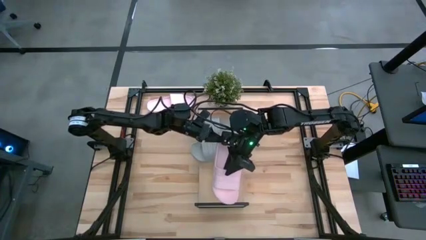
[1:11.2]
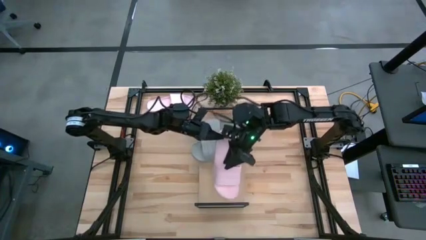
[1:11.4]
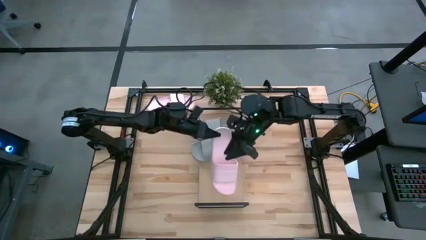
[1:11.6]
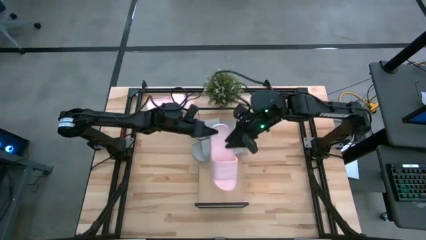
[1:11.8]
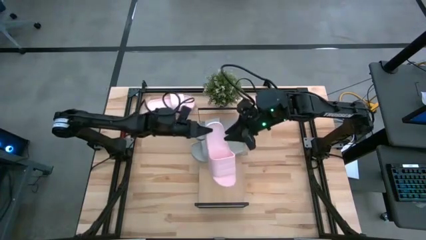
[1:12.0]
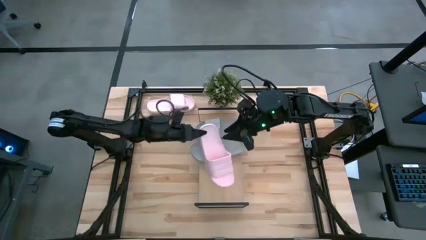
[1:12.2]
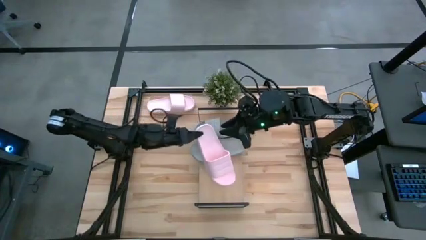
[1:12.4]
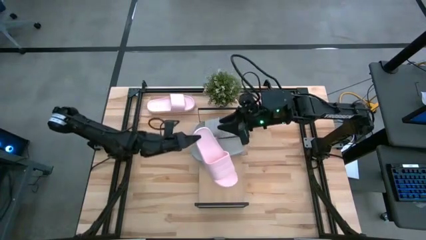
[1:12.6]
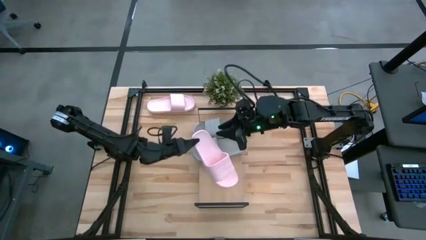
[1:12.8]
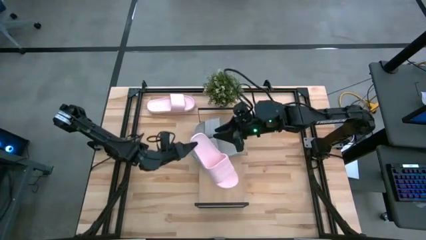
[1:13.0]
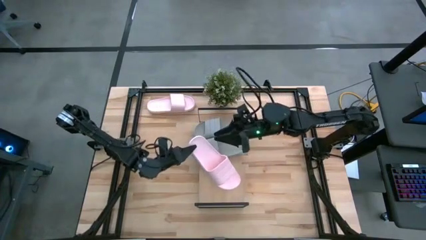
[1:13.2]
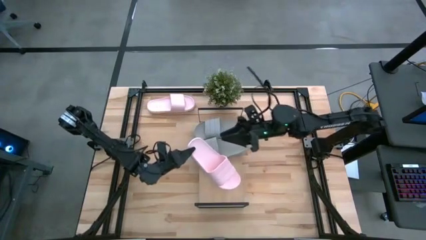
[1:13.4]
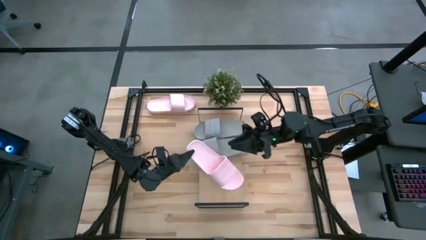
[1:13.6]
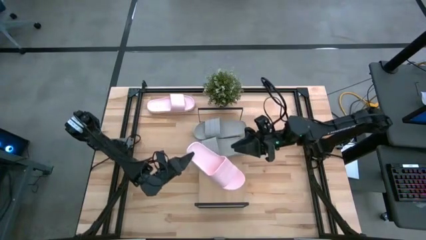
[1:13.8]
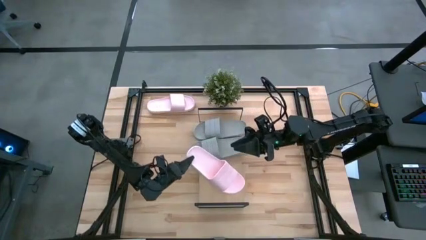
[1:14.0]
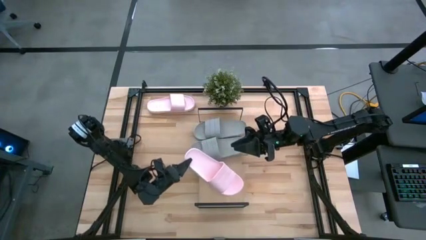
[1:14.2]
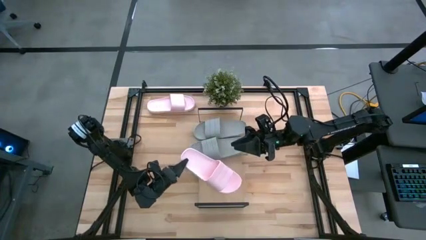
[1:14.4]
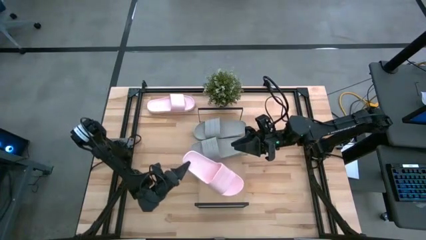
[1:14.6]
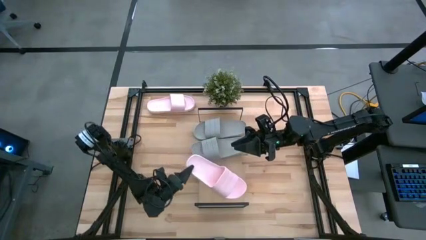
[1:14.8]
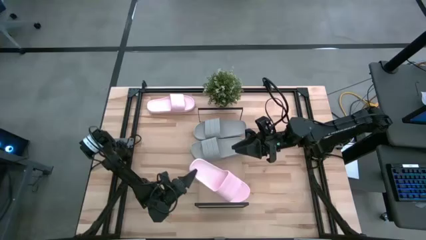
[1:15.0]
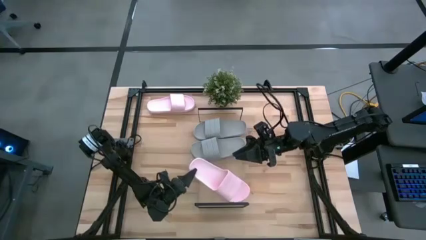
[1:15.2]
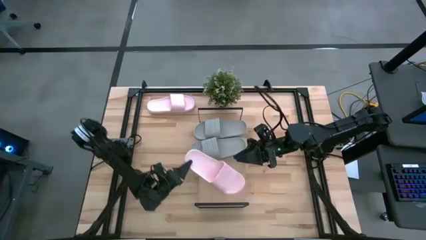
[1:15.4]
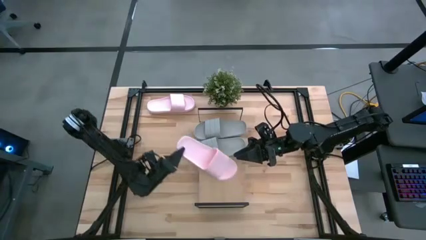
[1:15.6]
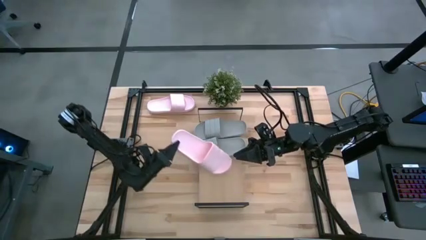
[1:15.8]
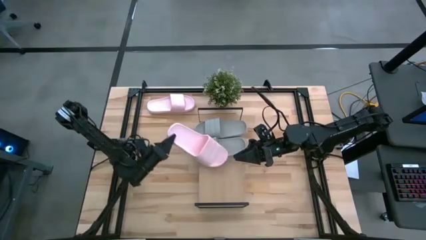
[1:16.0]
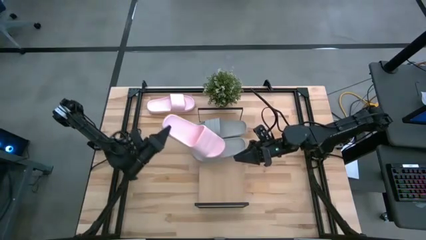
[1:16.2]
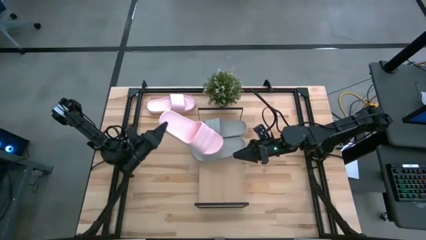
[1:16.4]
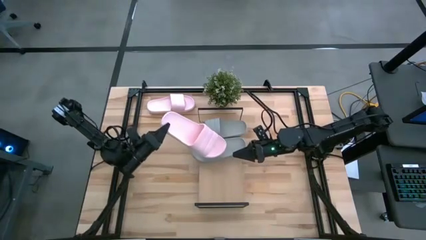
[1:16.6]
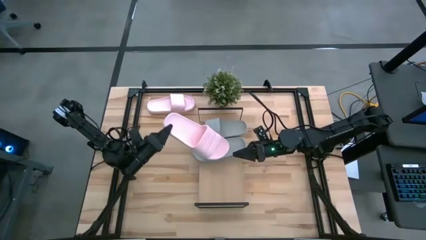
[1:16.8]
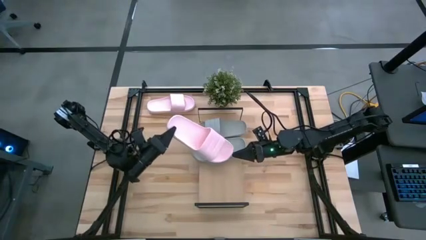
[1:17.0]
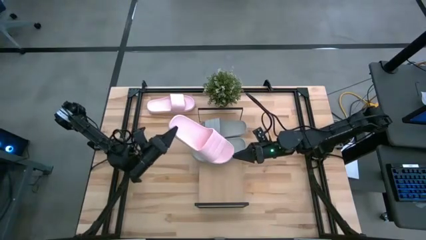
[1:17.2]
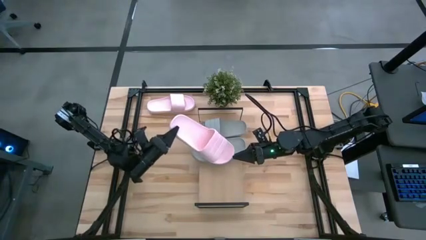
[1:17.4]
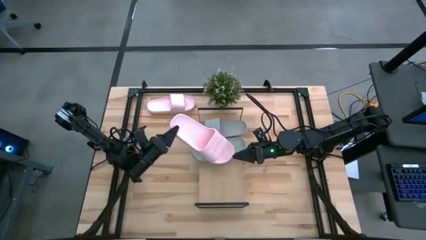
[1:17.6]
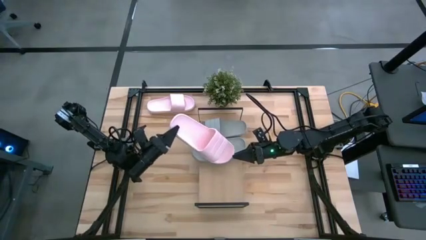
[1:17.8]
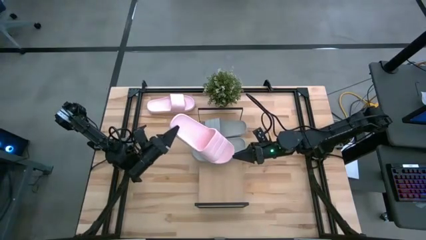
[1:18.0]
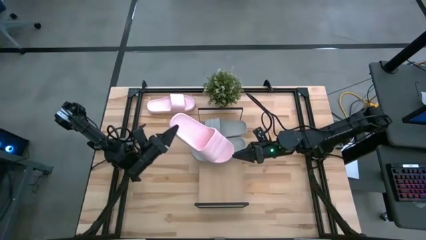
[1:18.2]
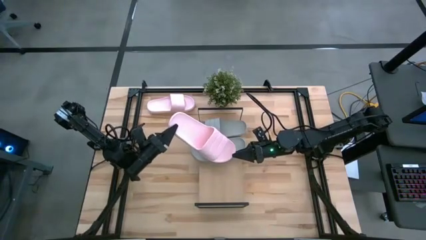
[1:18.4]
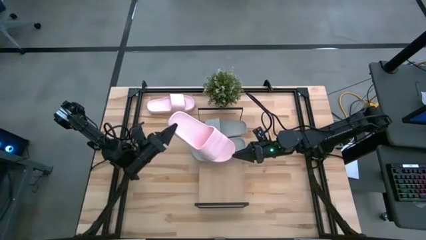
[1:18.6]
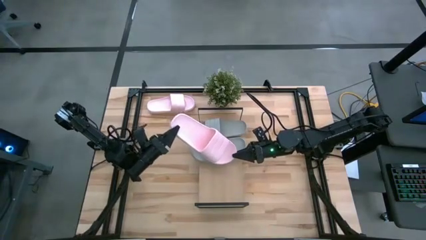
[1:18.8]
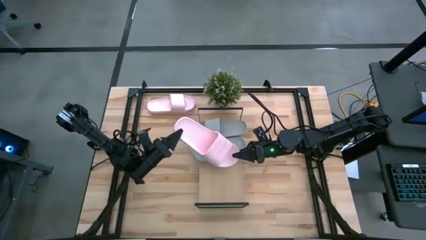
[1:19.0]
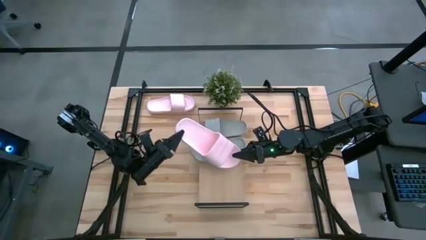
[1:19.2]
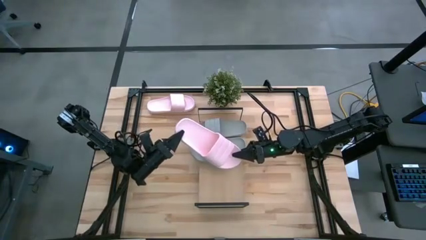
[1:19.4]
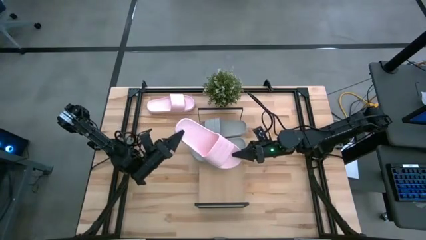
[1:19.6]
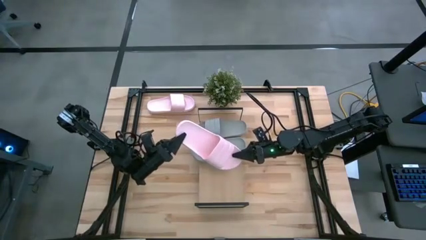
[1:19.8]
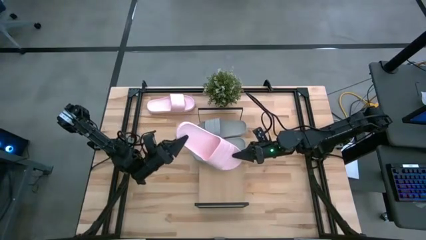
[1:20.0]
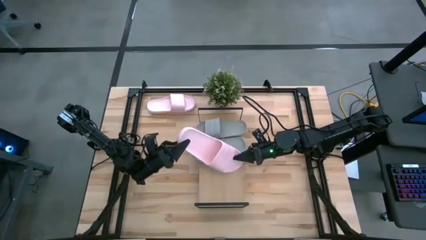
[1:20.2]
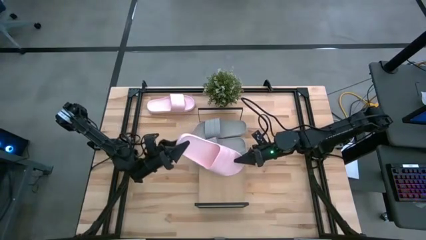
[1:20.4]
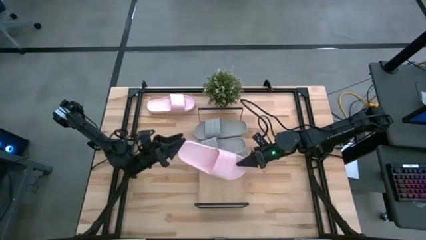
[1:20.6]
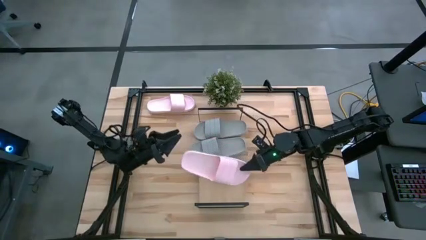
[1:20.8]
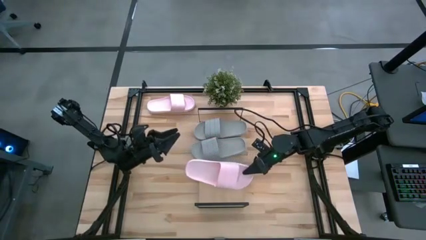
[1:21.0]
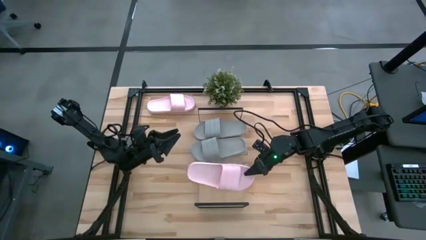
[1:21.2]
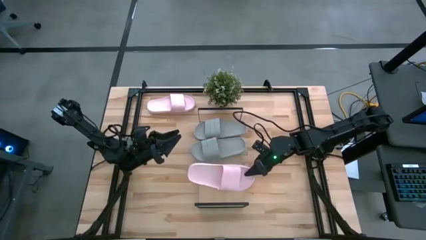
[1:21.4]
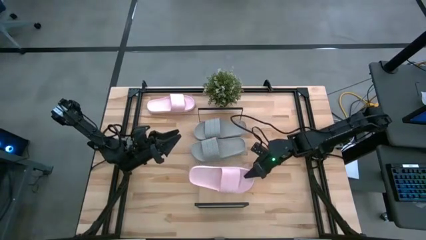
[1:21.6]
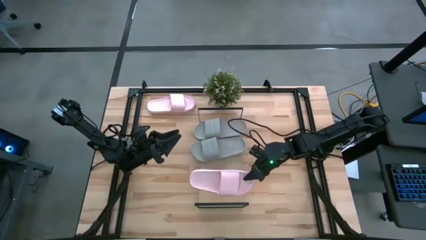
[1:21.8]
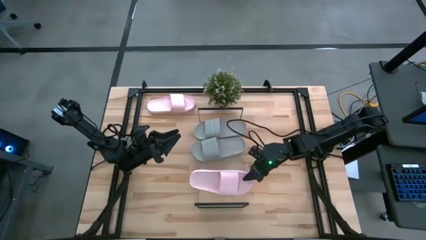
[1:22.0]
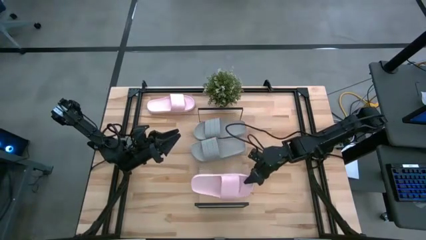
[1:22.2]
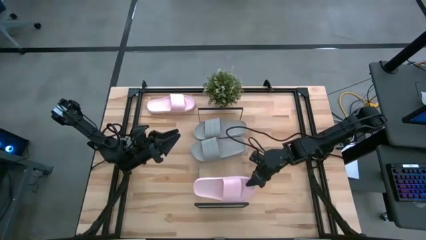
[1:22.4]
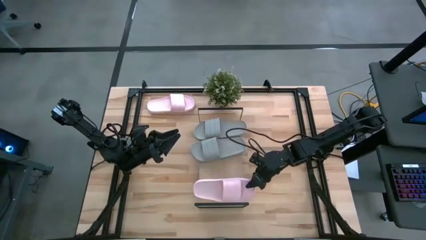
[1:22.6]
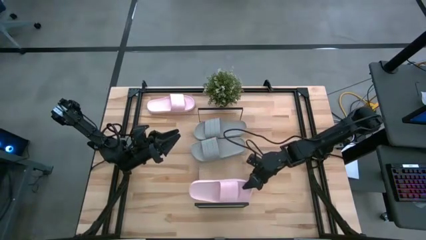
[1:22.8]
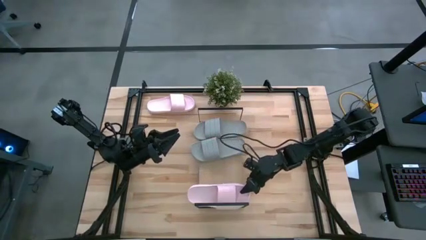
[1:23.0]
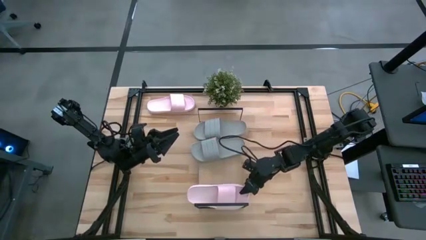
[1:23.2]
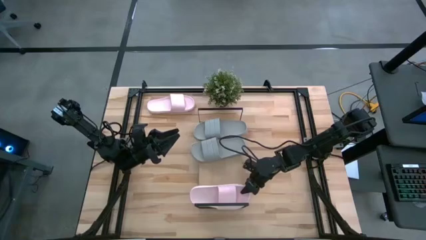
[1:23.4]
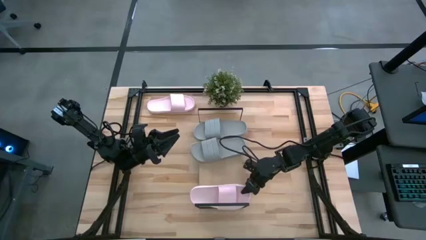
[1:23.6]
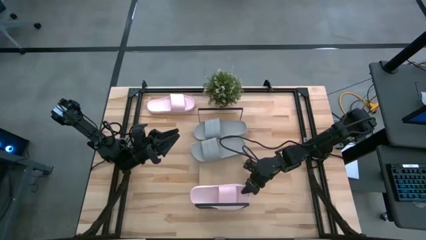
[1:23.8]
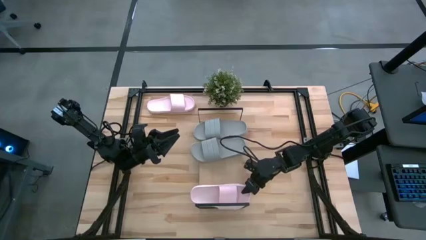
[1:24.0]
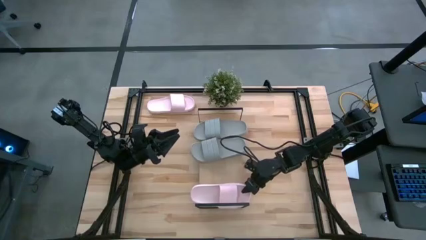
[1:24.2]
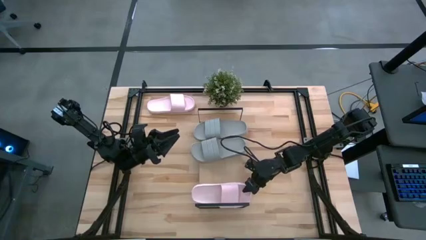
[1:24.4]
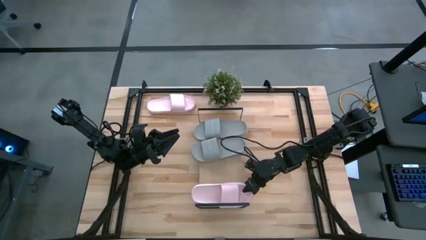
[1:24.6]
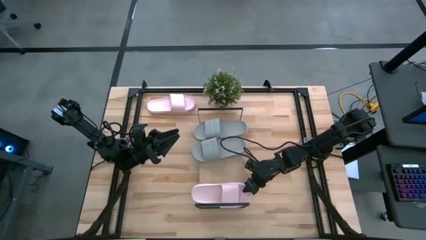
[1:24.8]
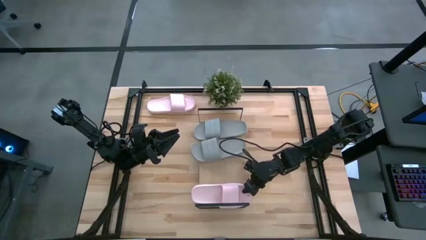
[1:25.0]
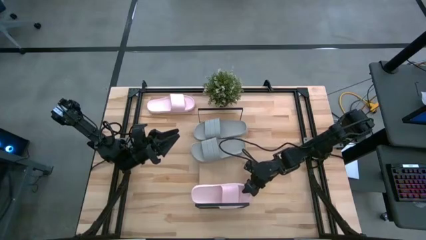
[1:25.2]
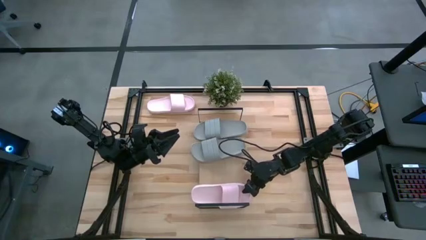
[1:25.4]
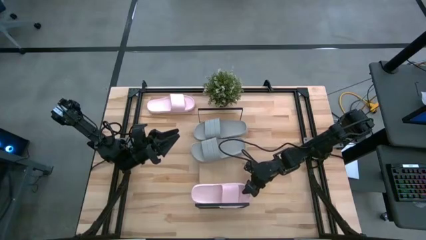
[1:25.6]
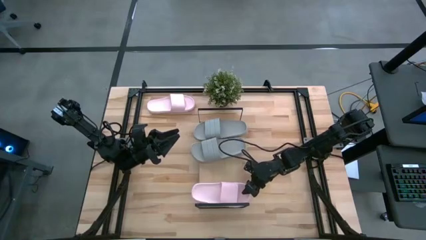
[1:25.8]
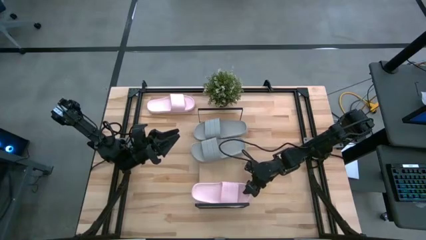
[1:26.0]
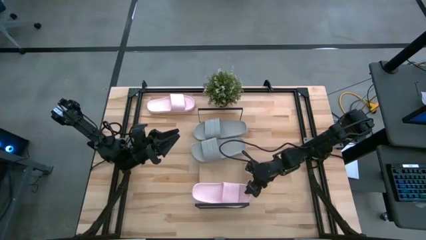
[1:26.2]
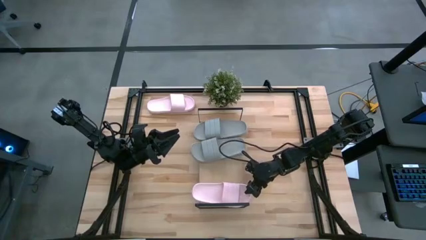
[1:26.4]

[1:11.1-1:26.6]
Task: Pick and place slides into the shelf
Put the bottom pink slide on the shelf

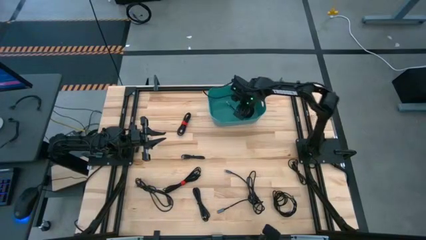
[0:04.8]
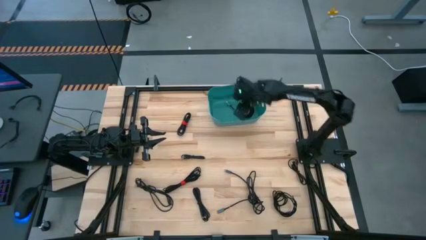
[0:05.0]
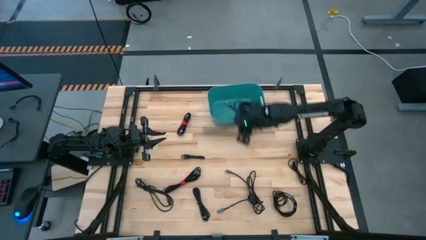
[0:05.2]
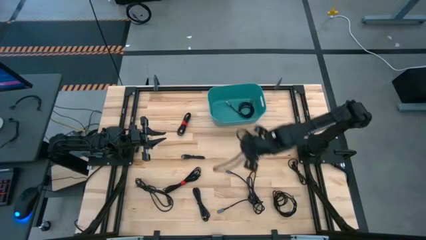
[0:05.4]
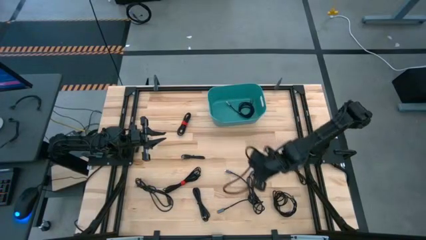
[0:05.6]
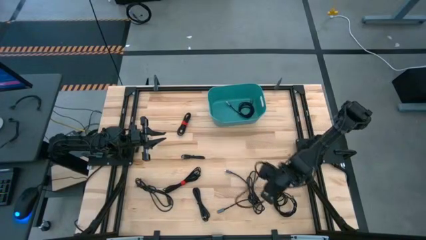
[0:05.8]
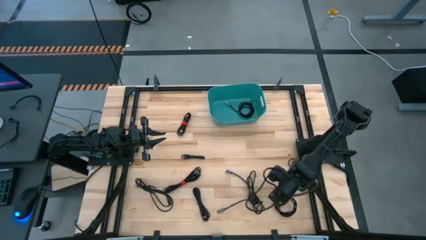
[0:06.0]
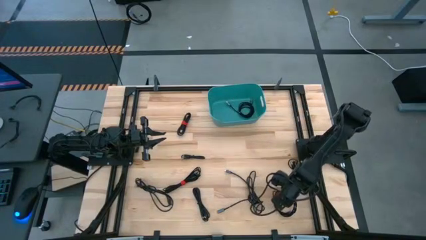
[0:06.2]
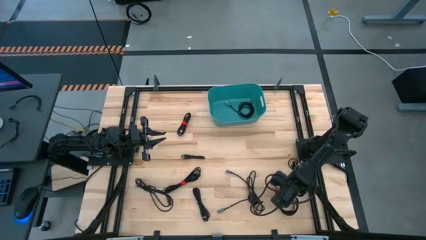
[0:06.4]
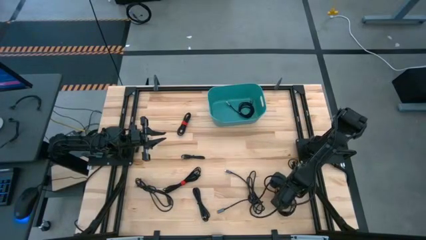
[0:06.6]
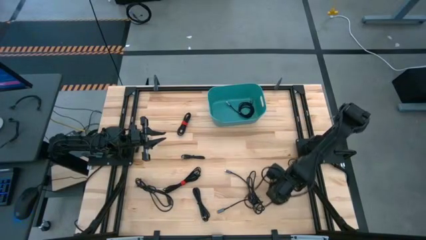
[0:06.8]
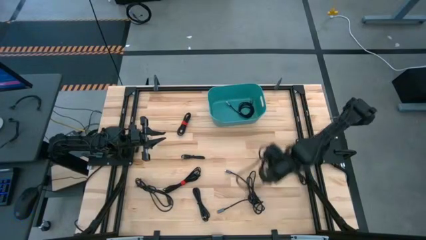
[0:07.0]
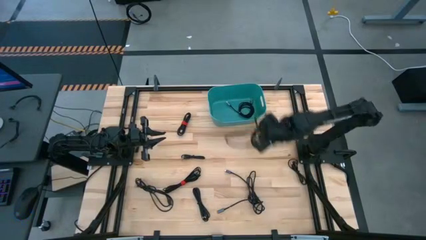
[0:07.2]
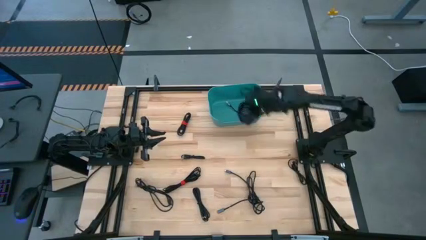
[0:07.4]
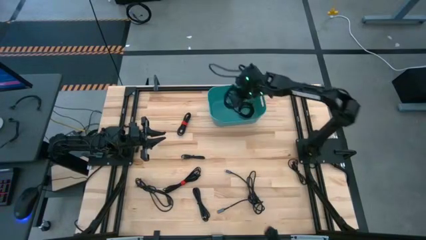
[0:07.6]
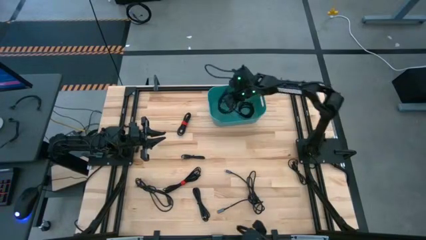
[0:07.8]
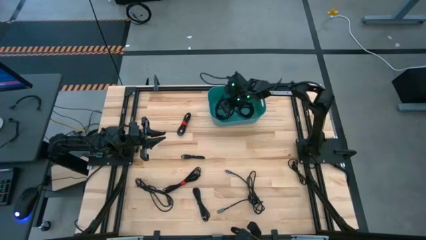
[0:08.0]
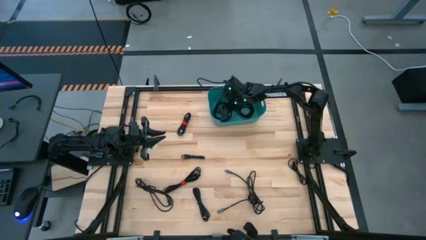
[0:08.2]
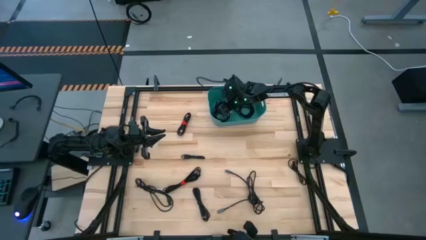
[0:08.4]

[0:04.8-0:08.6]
Task: Pick and place USB-C Cables
Put the black charger cable into the blue bin
